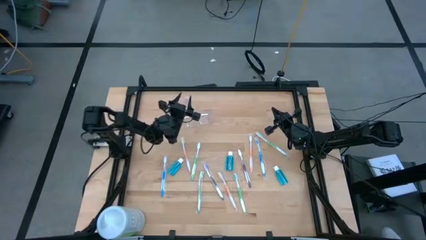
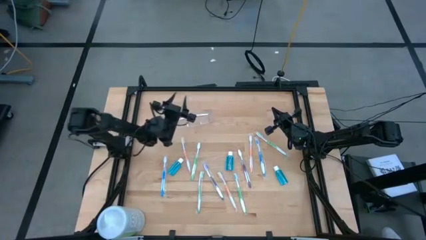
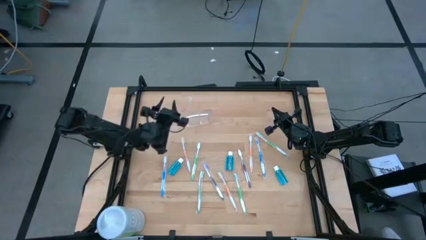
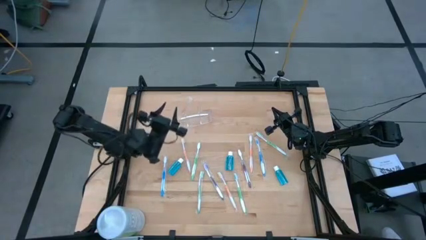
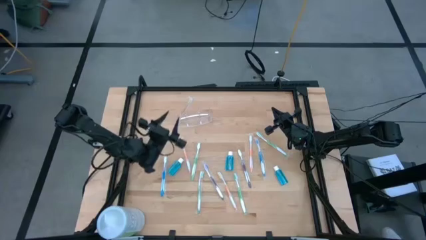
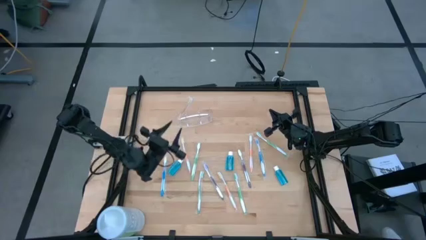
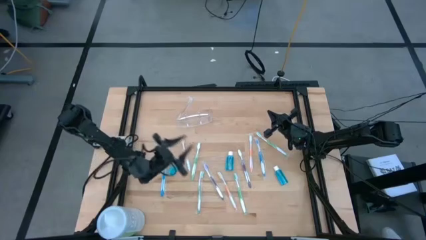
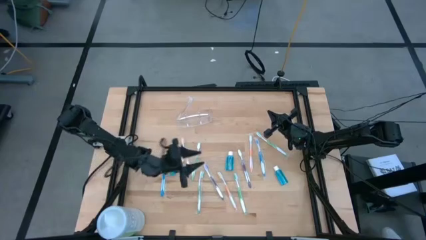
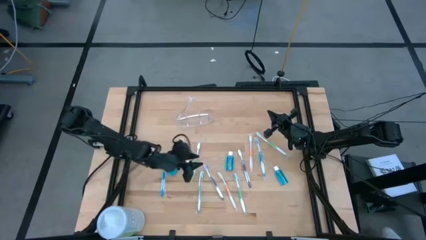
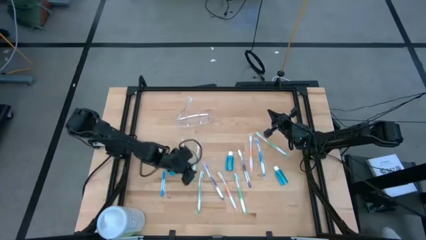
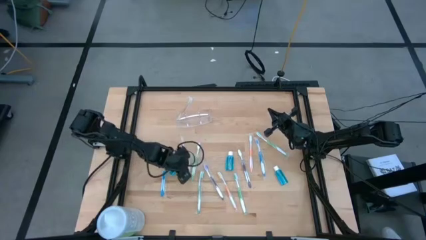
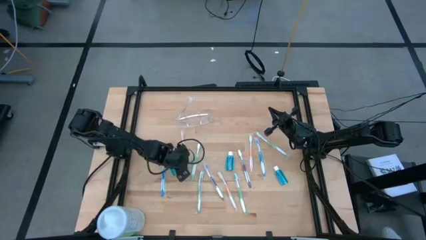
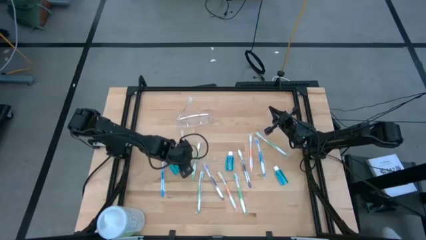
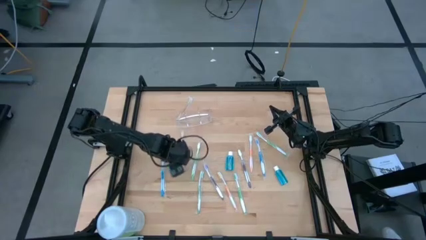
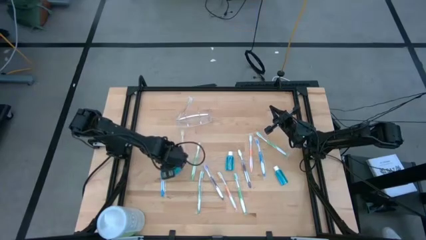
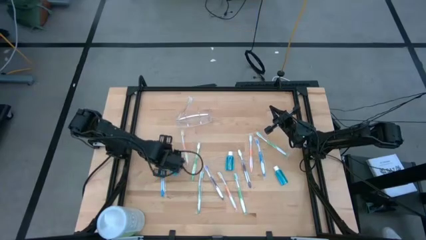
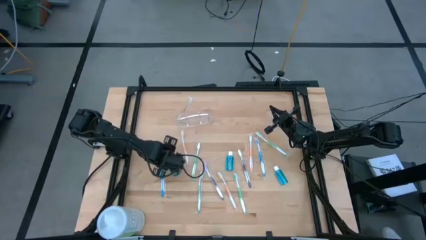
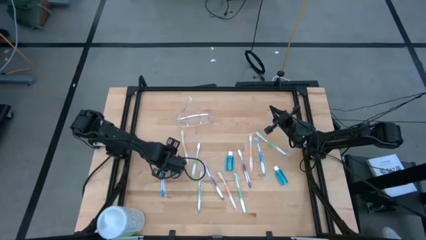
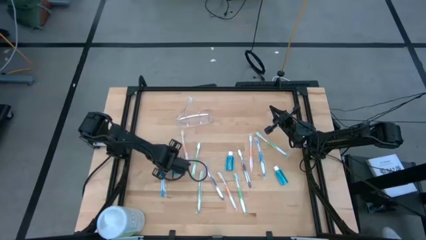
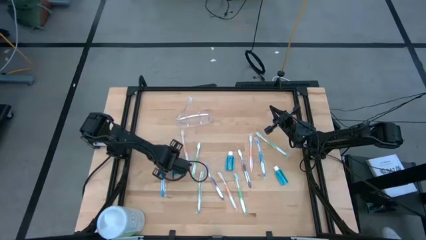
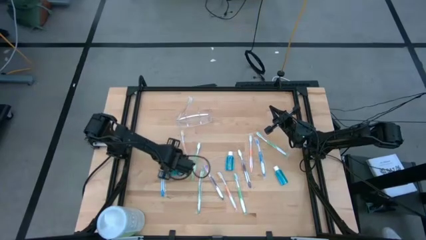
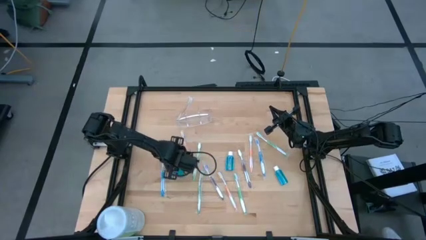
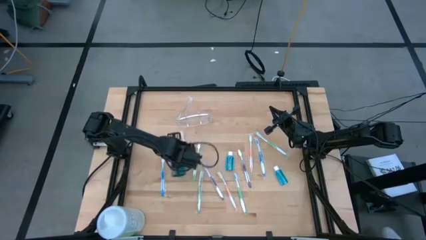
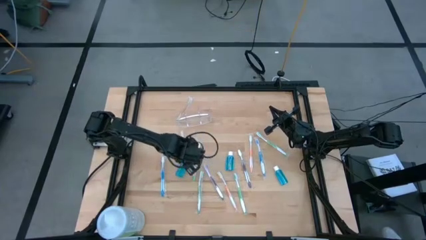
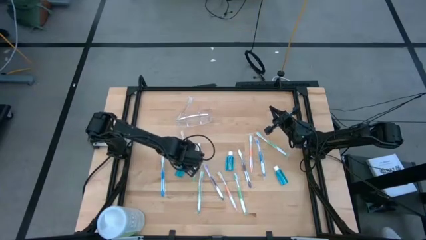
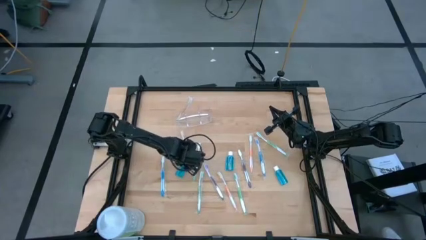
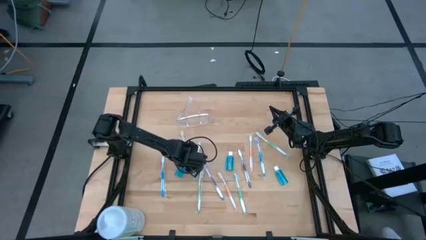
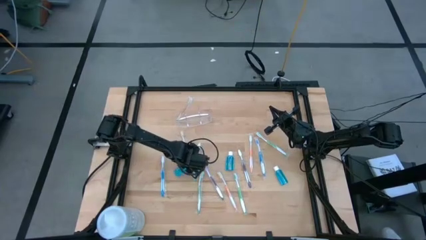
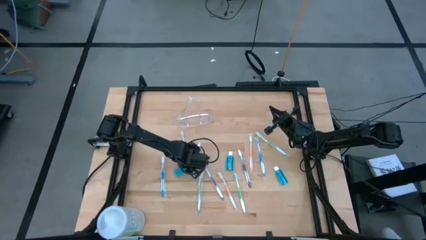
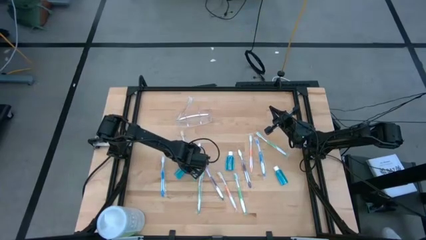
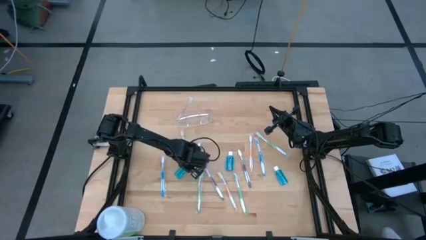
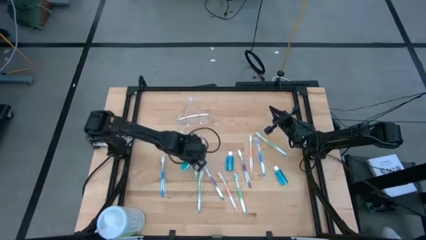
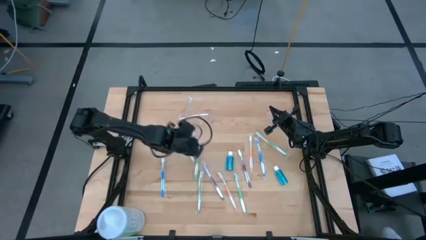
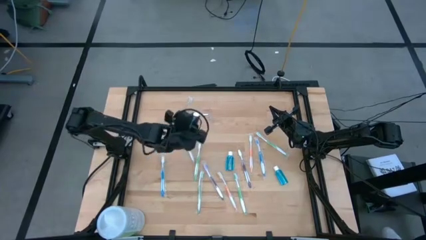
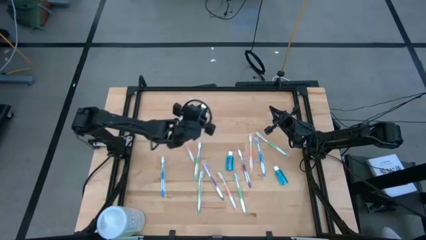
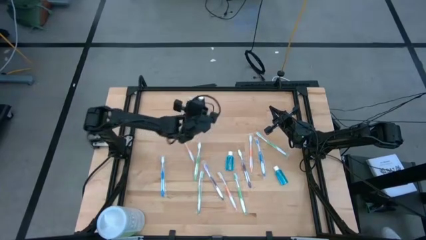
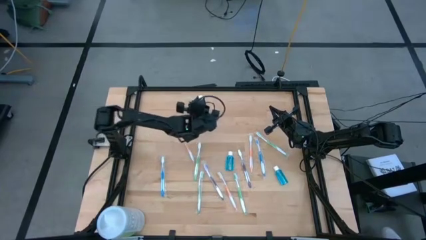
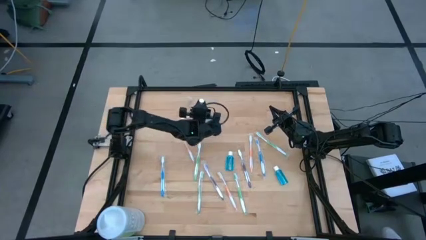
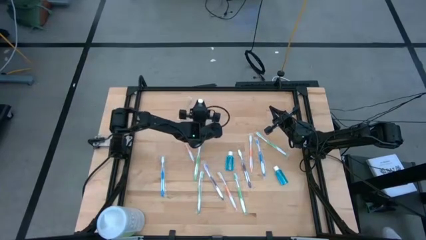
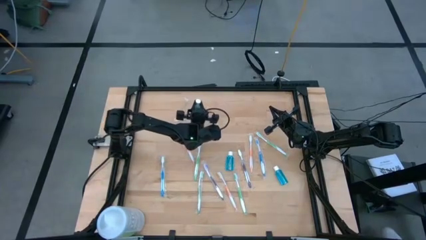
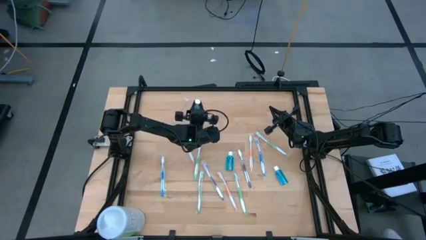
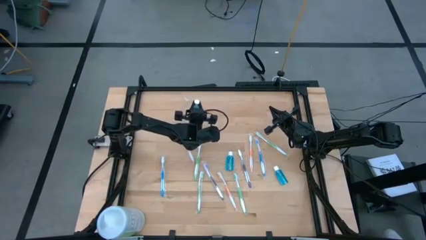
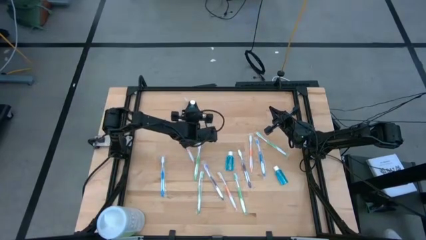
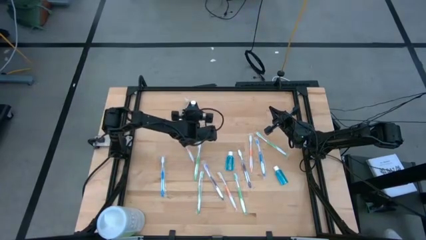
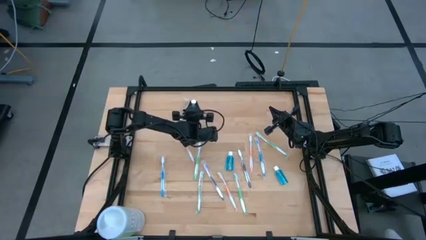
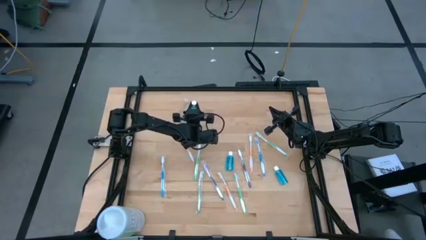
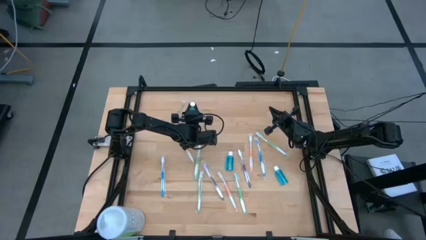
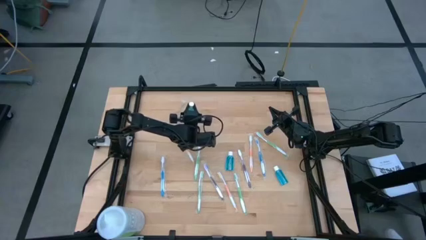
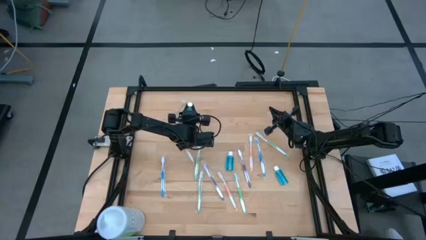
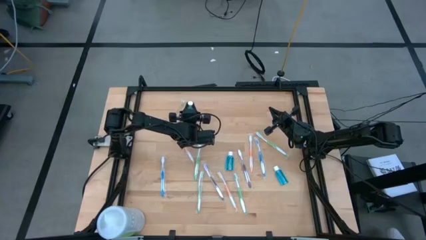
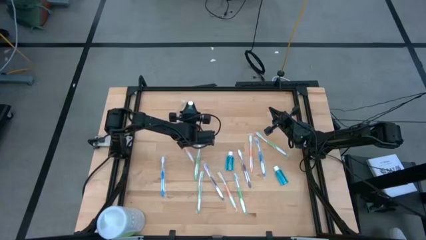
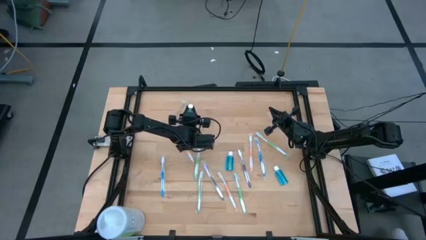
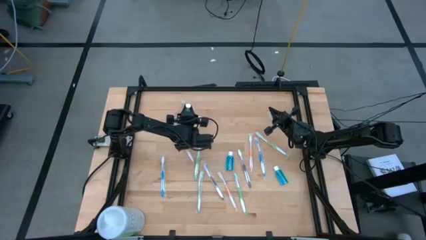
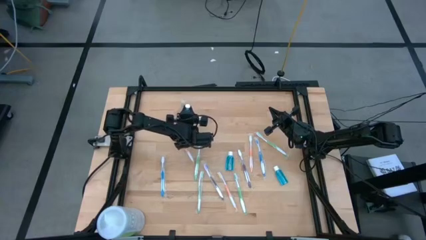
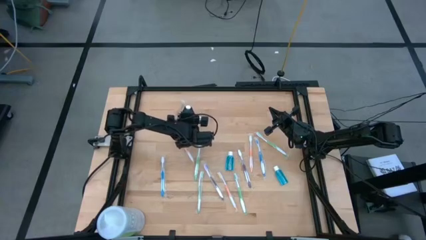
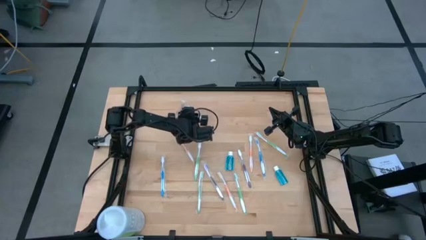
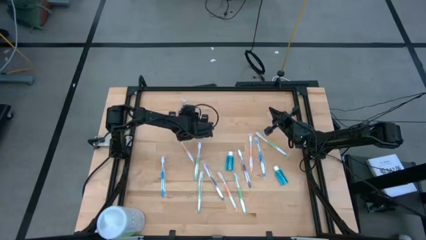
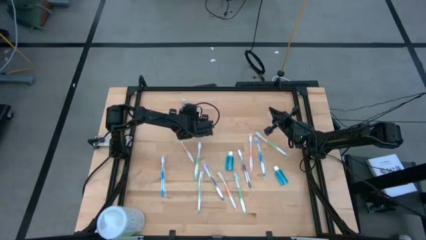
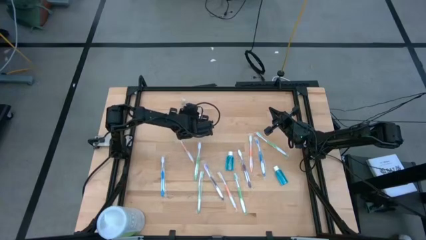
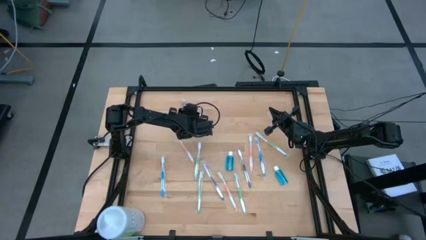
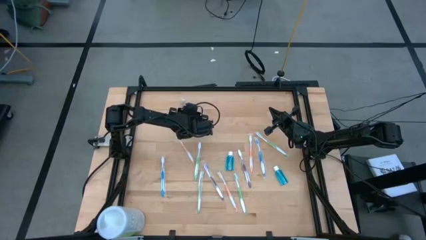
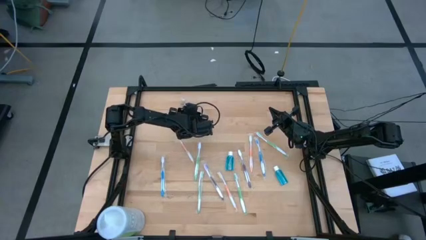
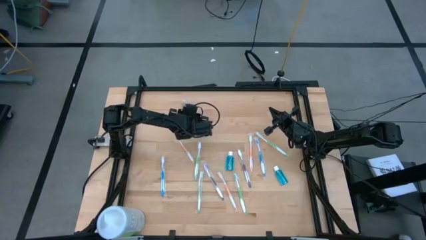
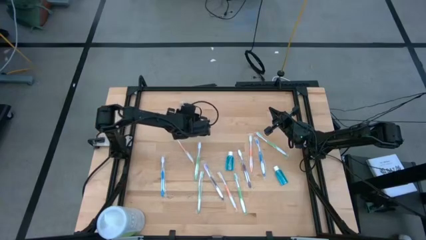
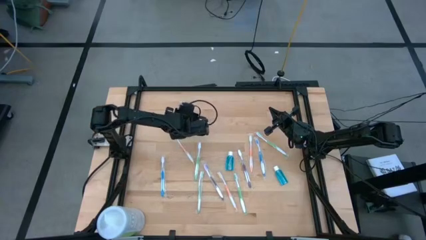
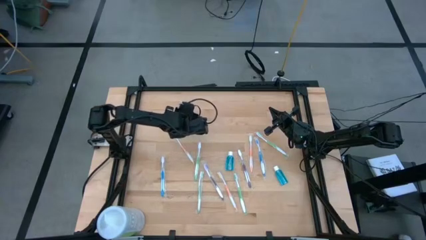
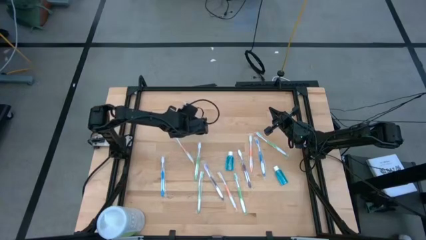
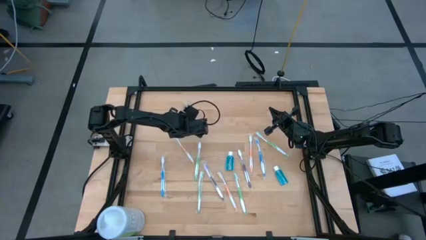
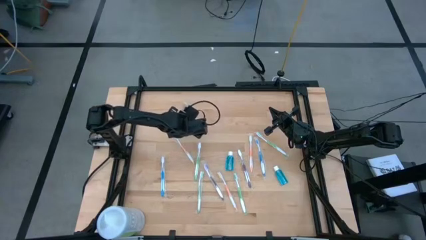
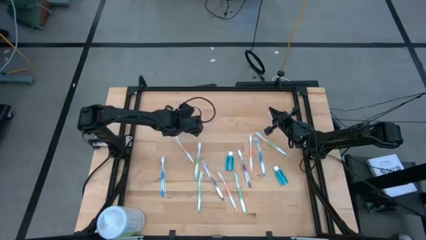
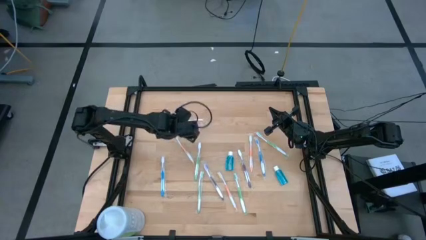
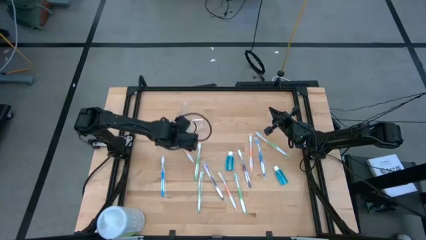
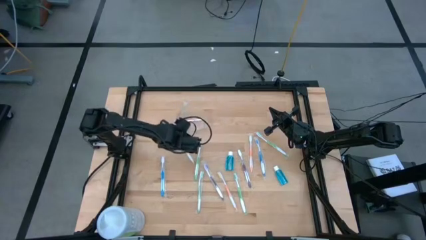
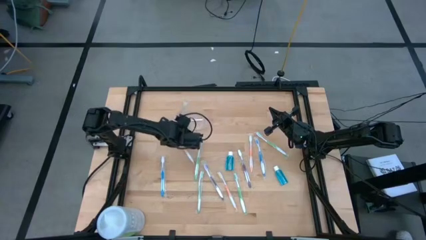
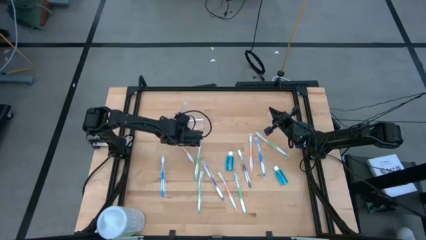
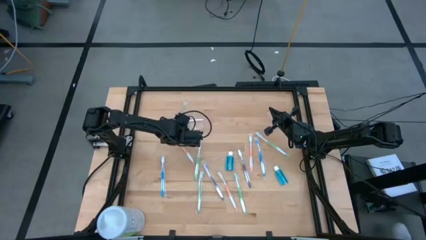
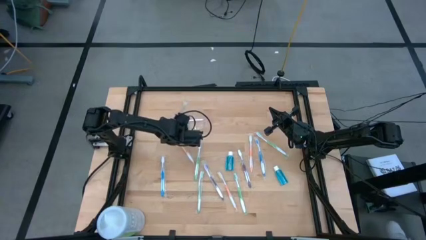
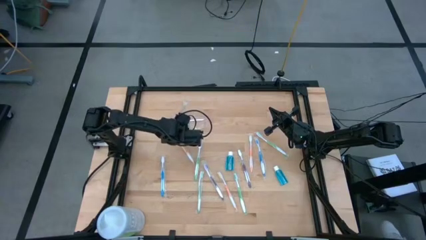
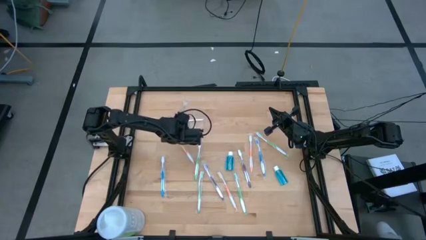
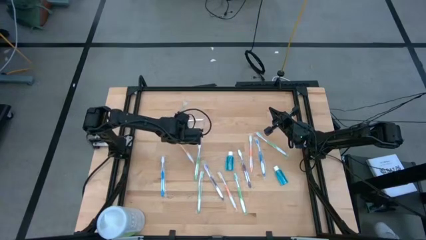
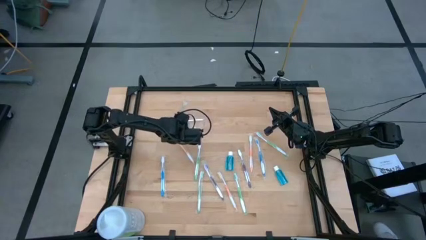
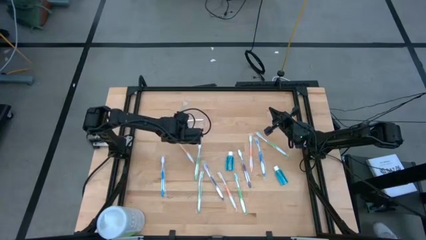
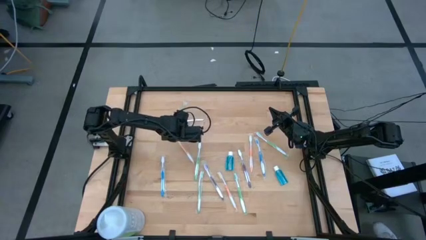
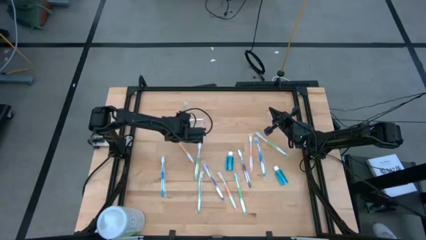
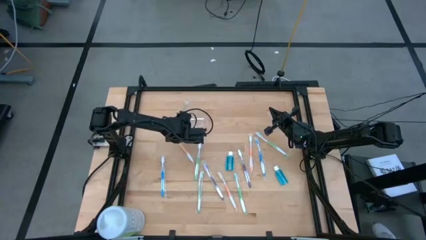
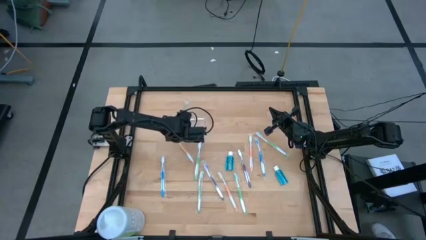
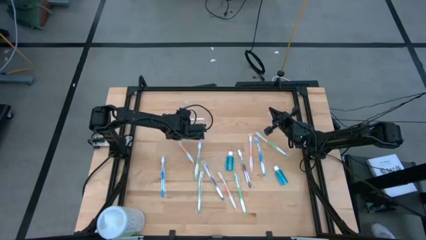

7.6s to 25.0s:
Task: Pick & Place toothbrushing station
Put the blue mouthwash into the transparent organizer
